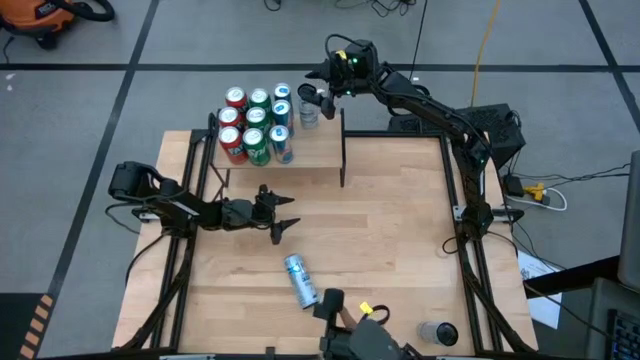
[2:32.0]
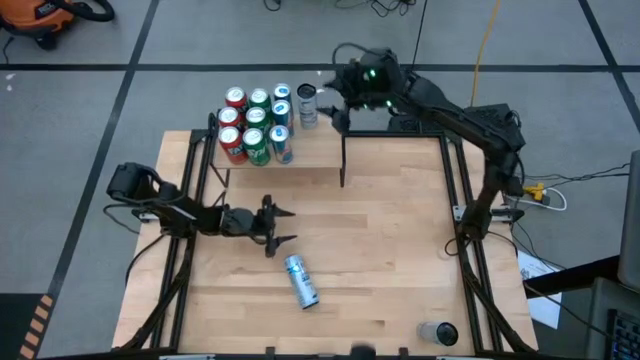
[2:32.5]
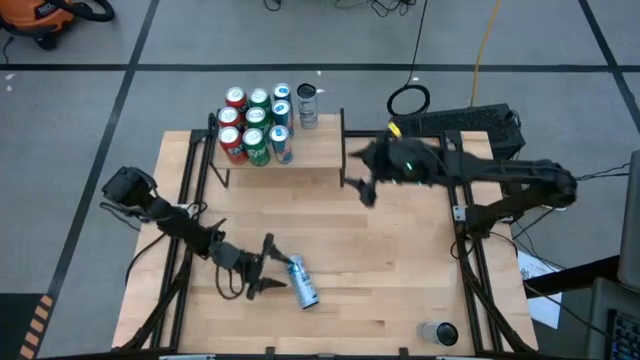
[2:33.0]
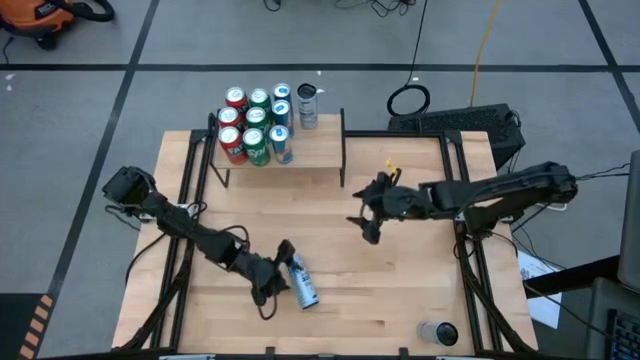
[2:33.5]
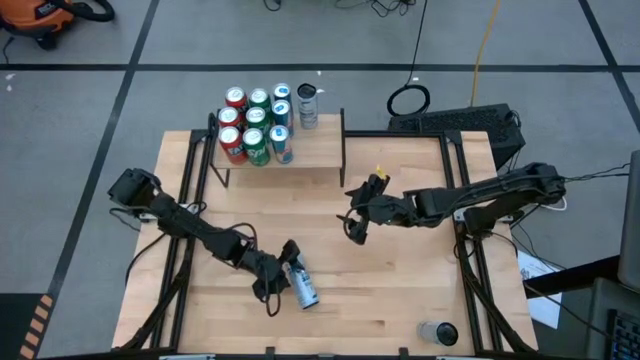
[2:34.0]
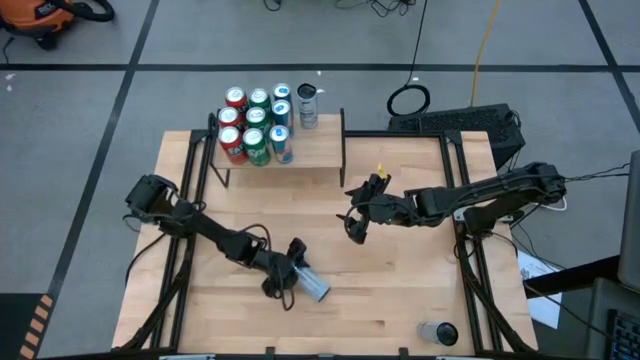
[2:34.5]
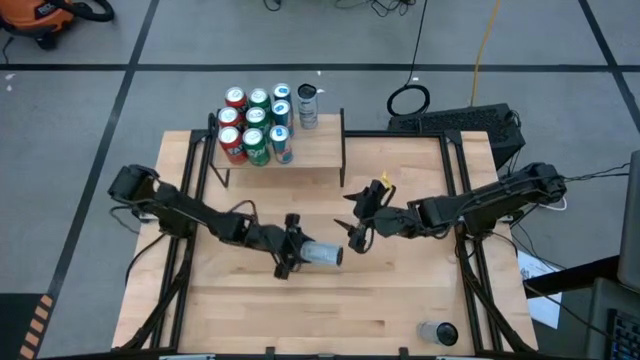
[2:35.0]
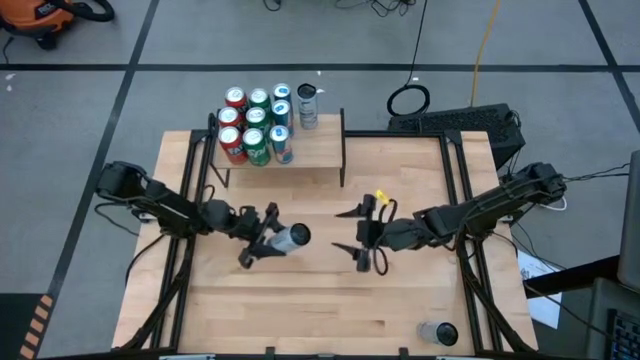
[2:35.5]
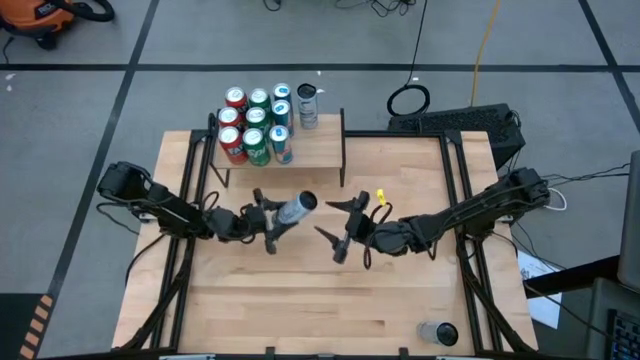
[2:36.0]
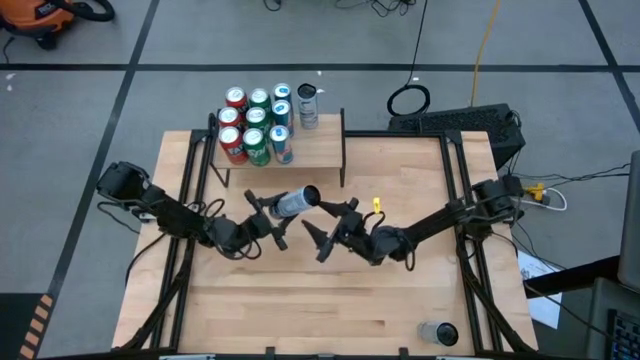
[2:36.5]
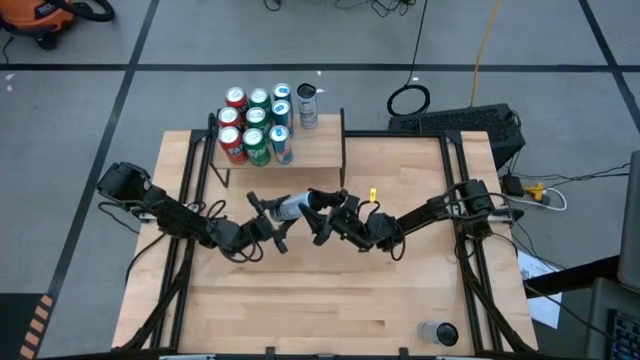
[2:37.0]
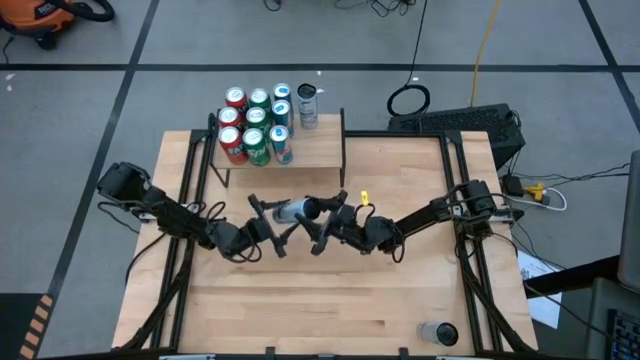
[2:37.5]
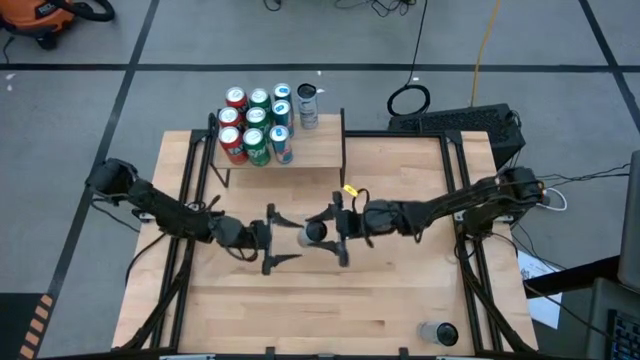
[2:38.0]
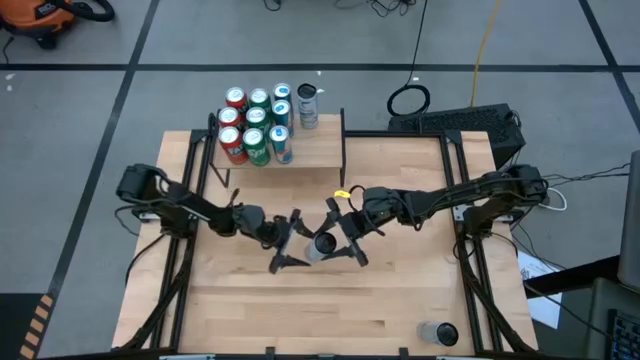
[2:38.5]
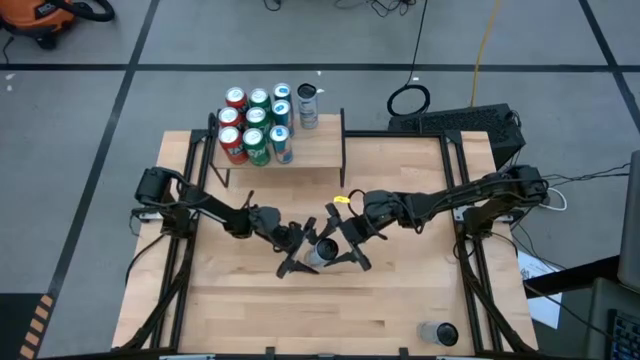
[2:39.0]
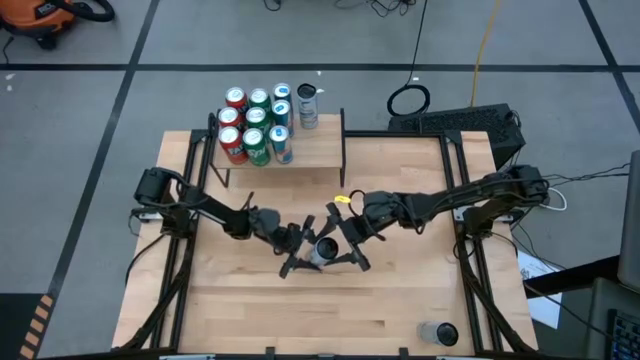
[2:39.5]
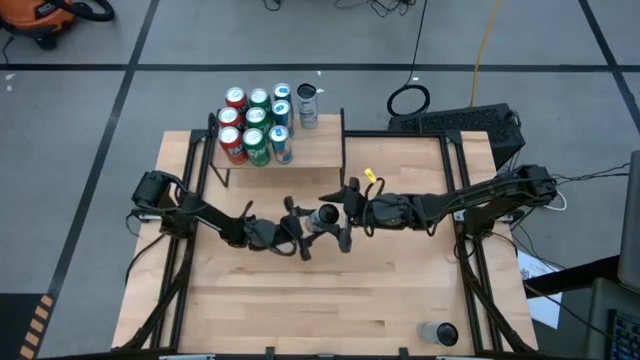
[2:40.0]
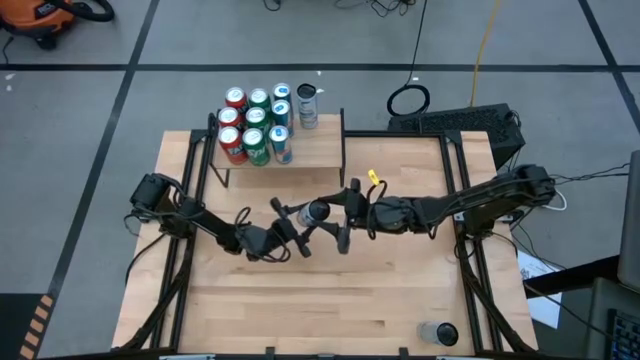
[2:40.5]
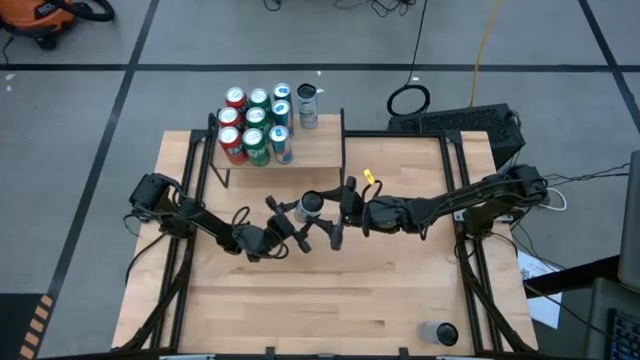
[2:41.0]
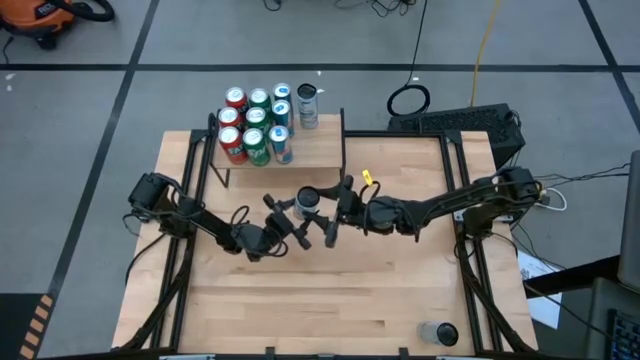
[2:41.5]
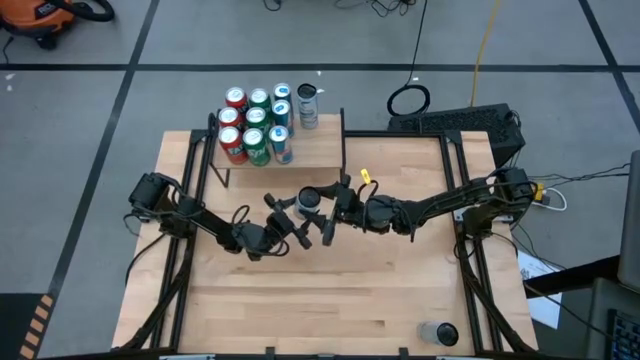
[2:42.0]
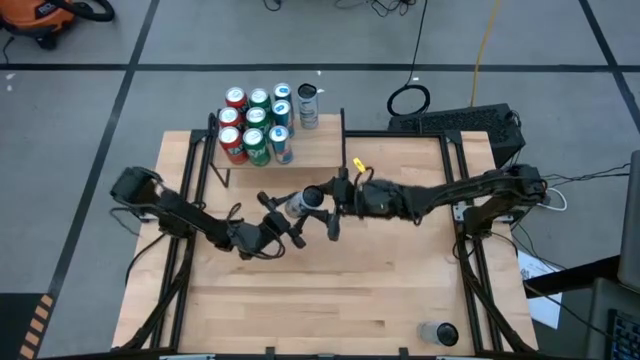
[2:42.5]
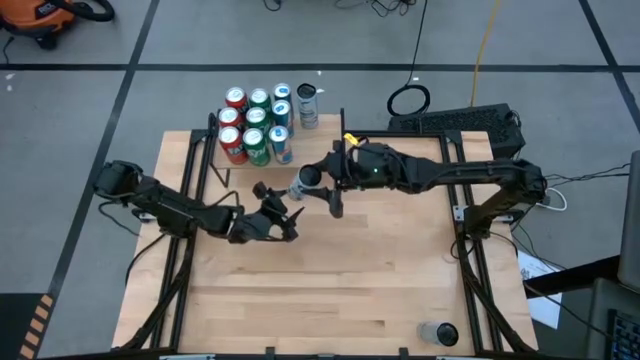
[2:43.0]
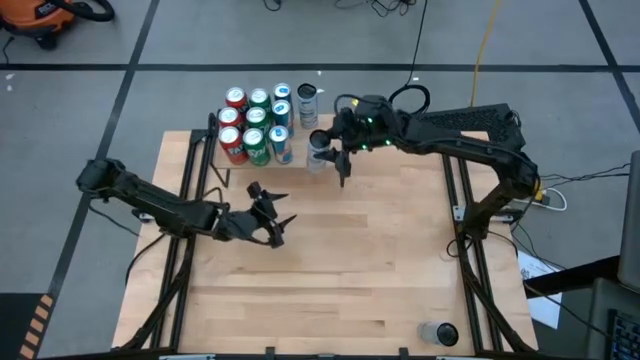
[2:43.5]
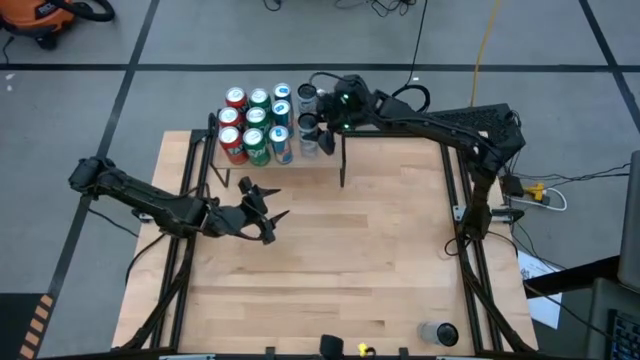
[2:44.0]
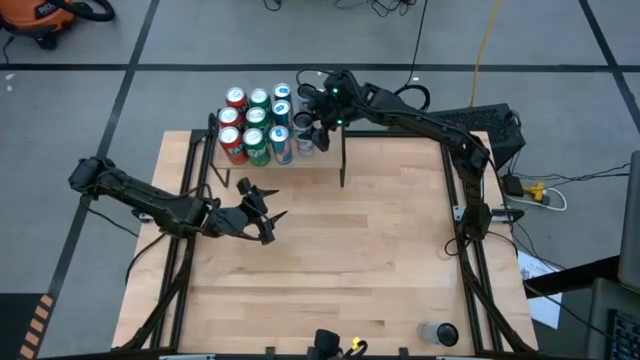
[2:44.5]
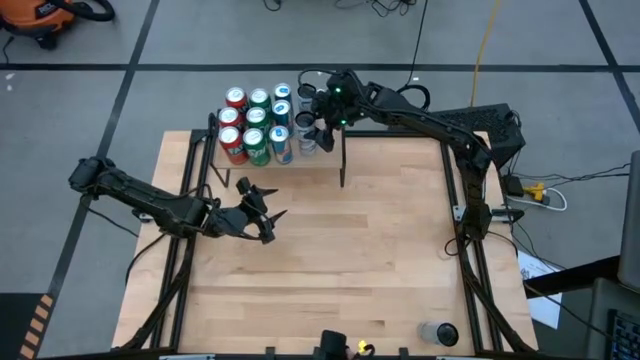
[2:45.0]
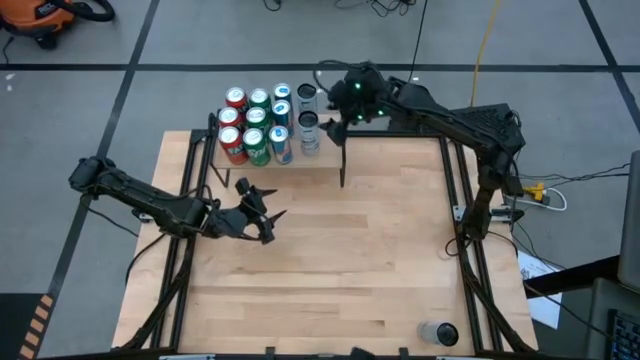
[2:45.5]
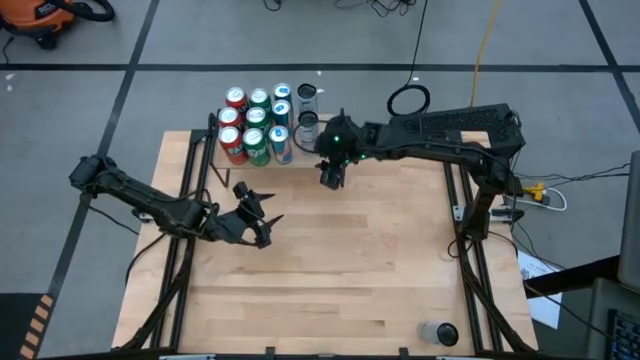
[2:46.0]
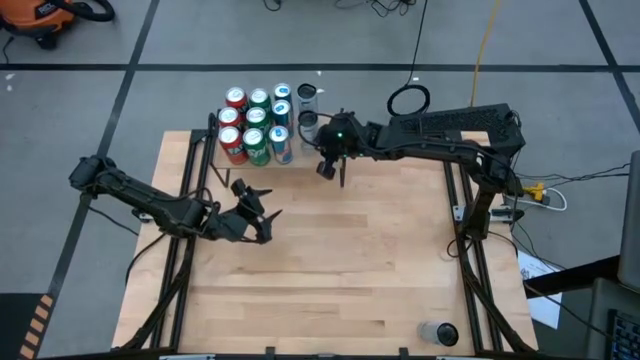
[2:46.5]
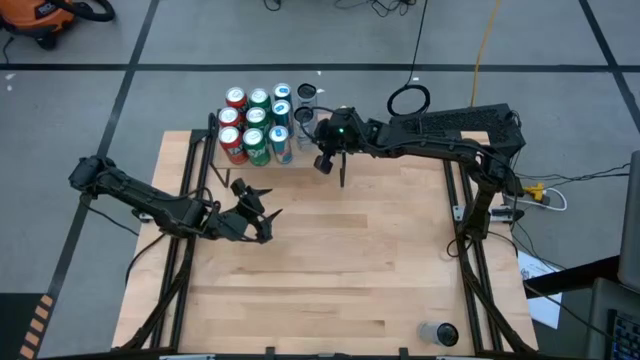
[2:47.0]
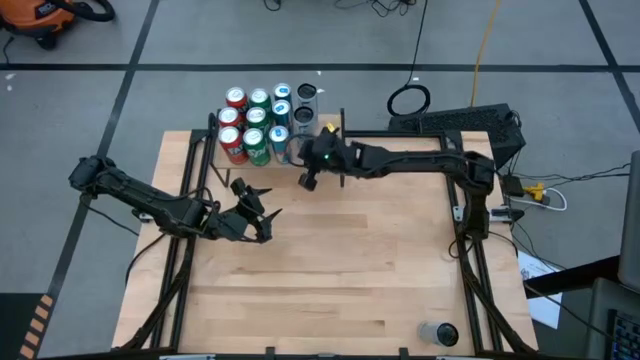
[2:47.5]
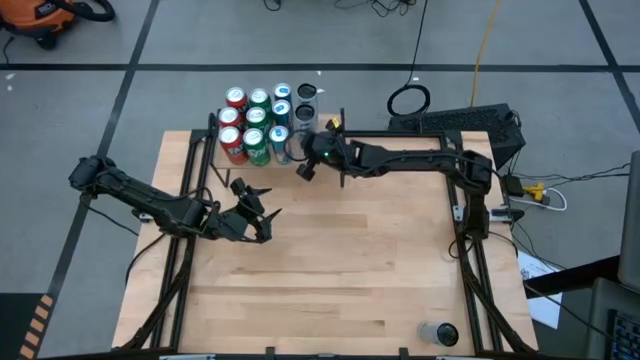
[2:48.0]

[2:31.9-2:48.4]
Task: Place canned beverage on shelf
Put the left black soda can on the shelf

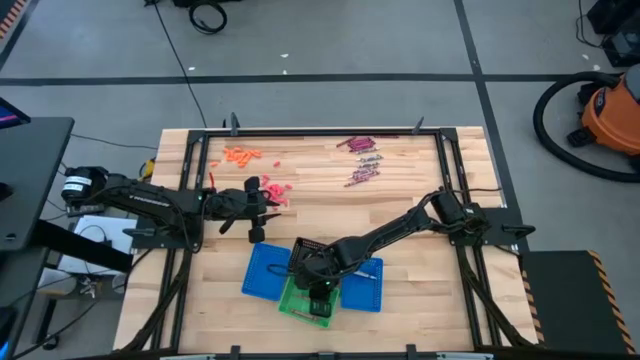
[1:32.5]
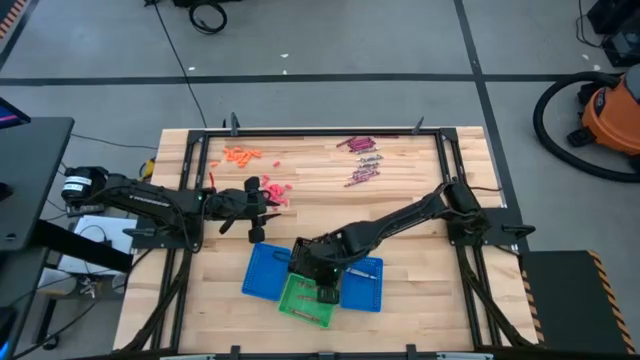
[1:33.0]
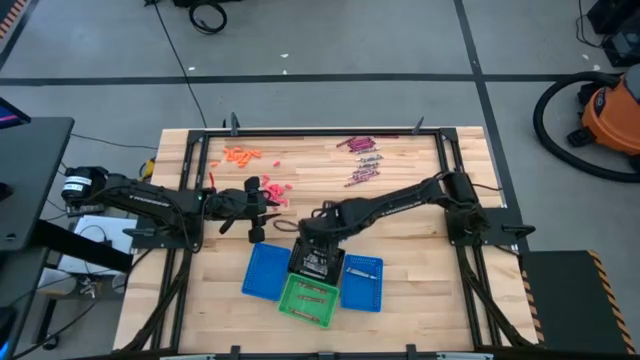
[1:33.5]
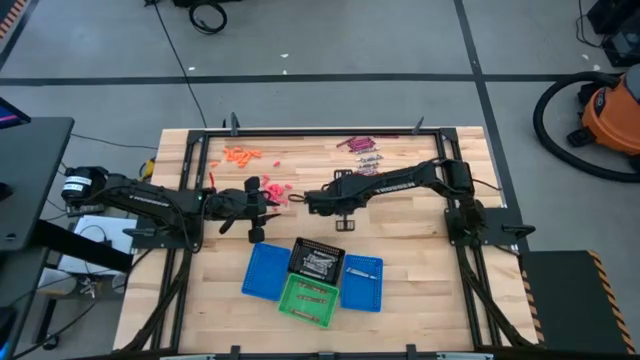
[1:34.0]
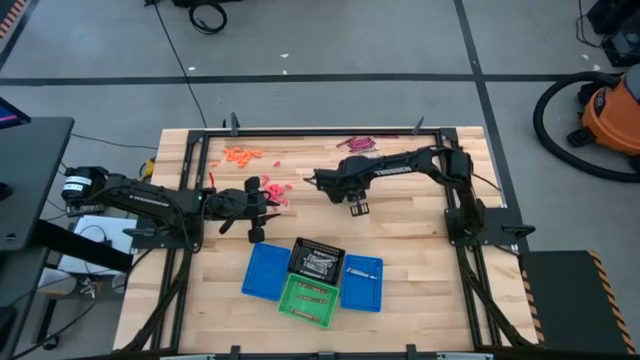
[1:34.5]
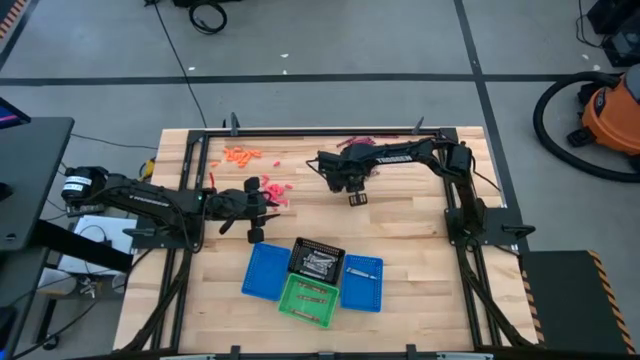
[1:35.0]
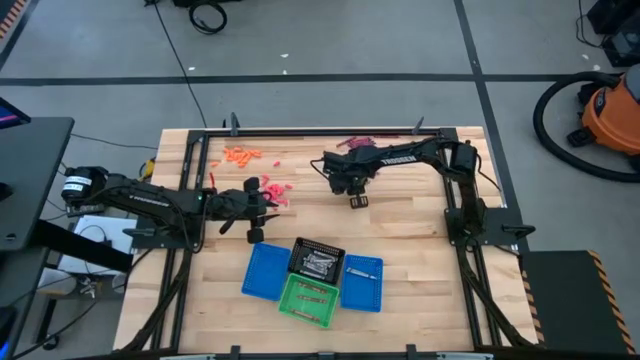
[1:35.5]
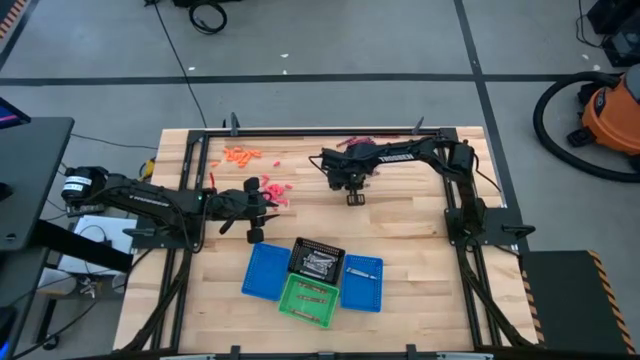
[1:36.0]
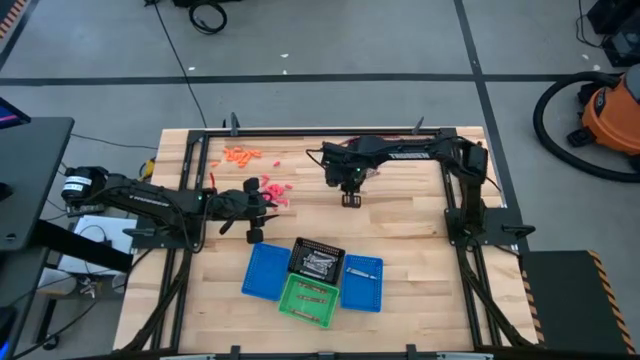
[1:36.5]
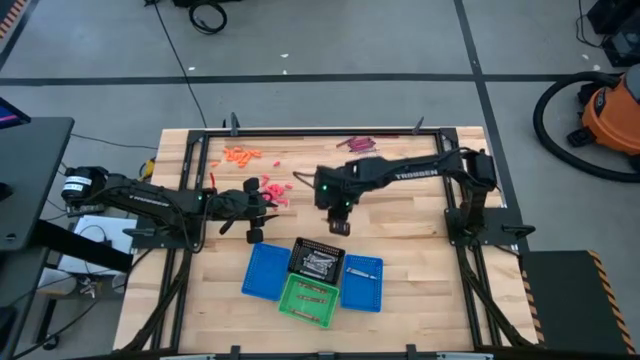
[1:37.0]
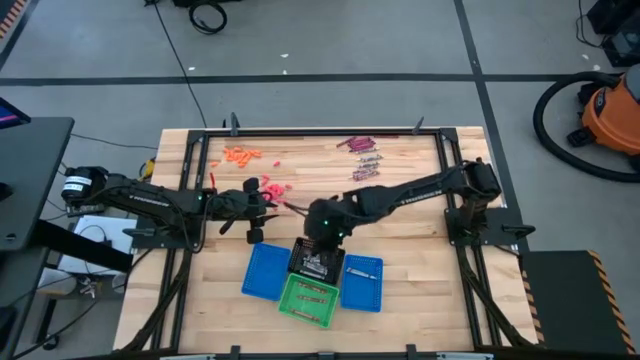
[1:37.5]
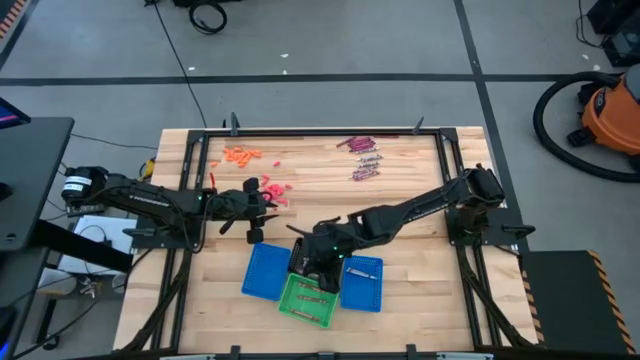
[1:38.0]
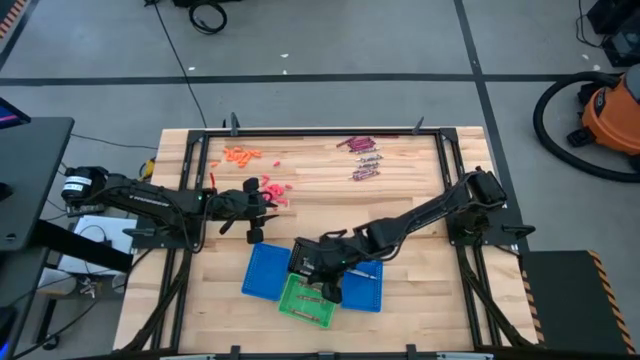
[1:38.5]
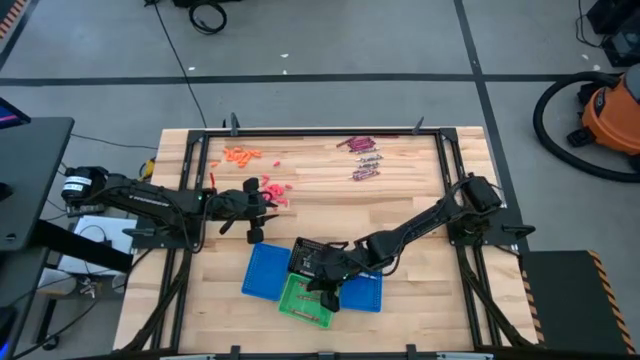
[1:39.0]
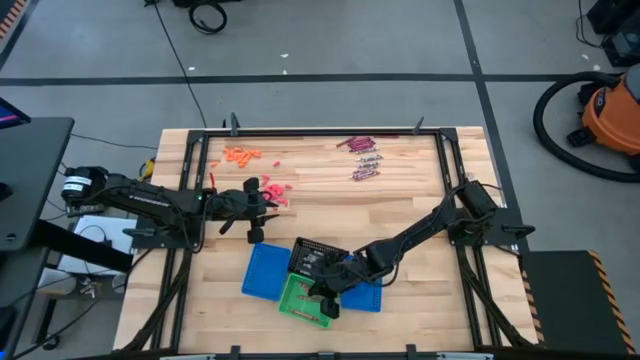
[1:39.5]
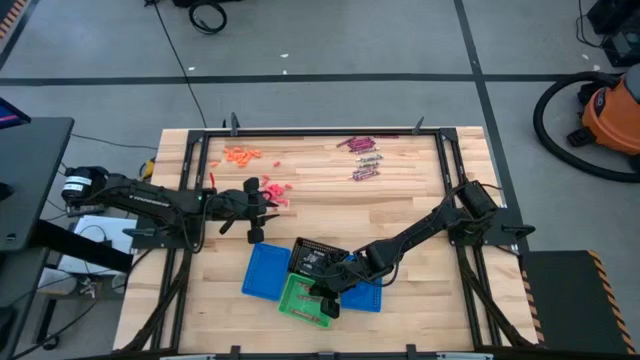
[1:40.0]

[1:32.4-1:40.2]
Task: Sort crayons
Put the pink crayon into the green bin
